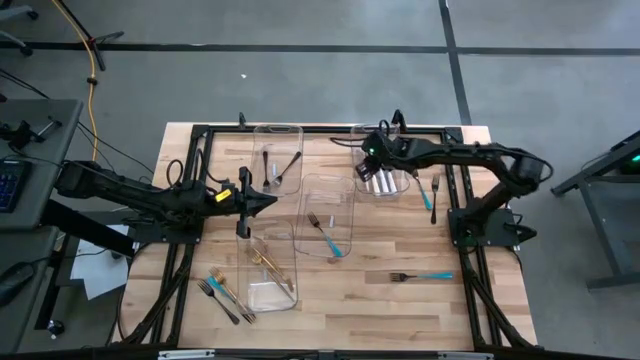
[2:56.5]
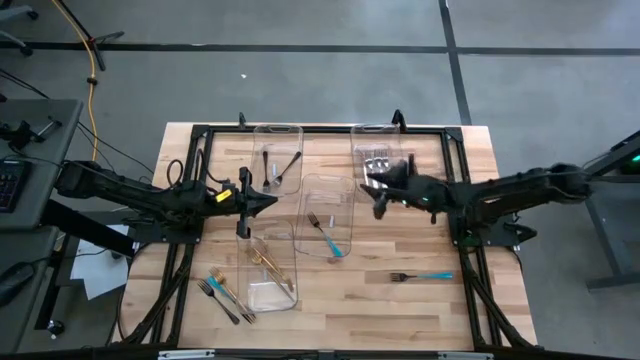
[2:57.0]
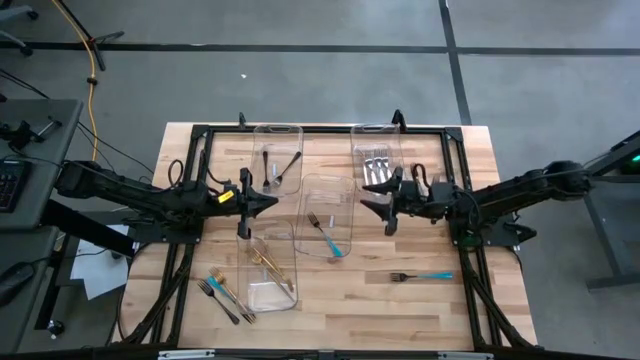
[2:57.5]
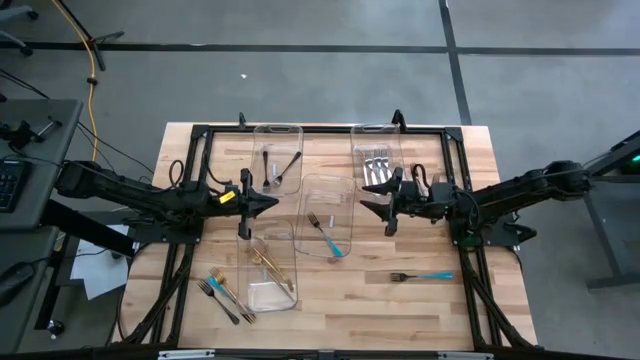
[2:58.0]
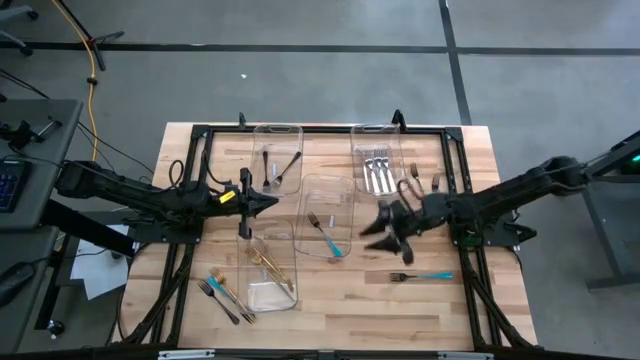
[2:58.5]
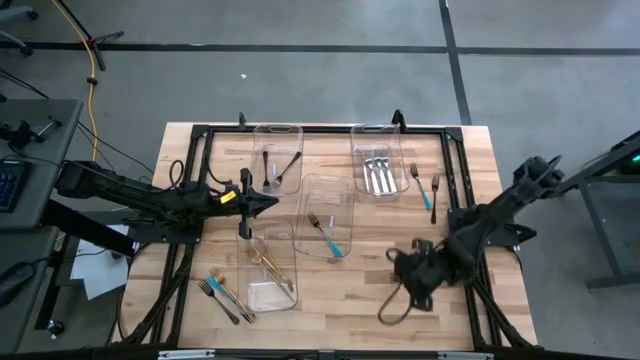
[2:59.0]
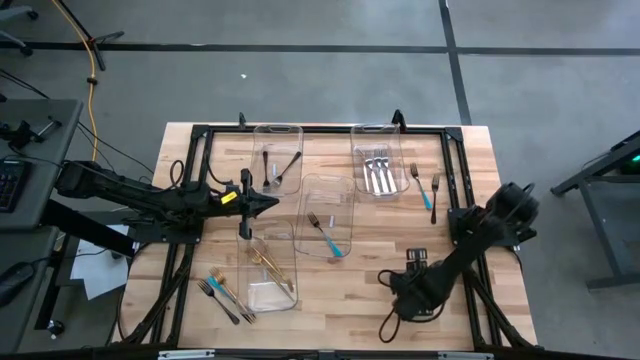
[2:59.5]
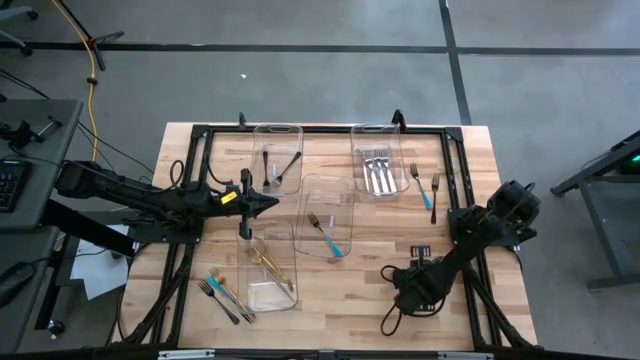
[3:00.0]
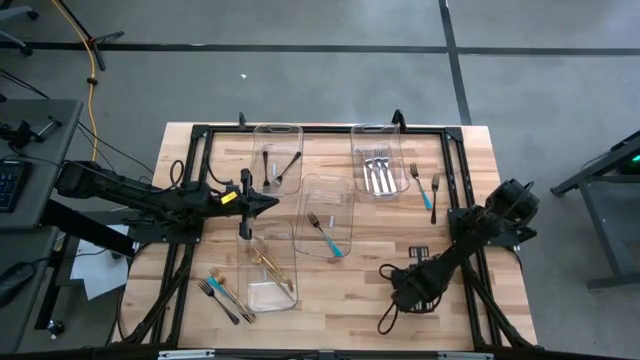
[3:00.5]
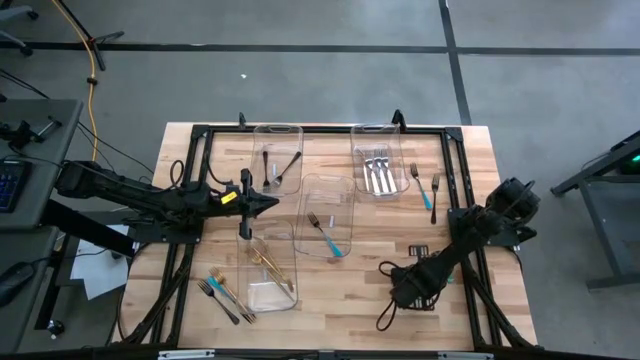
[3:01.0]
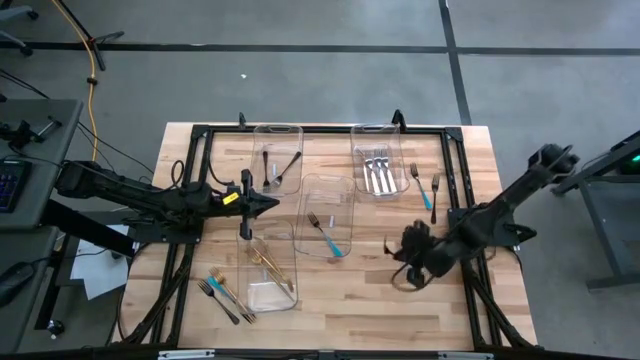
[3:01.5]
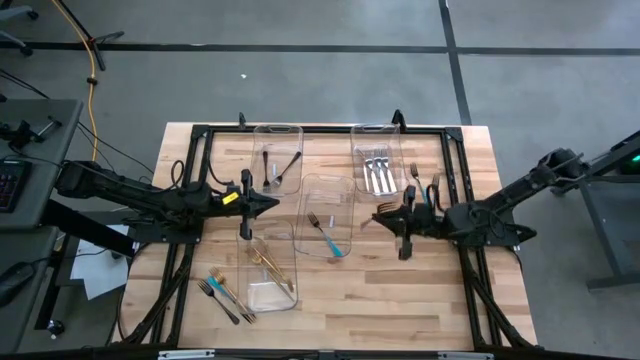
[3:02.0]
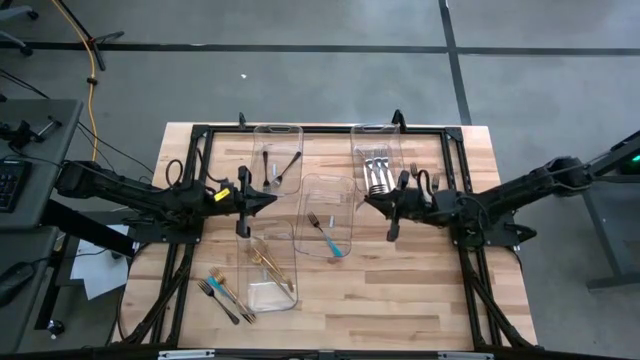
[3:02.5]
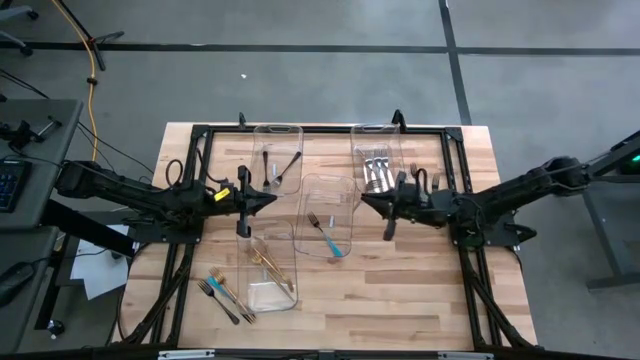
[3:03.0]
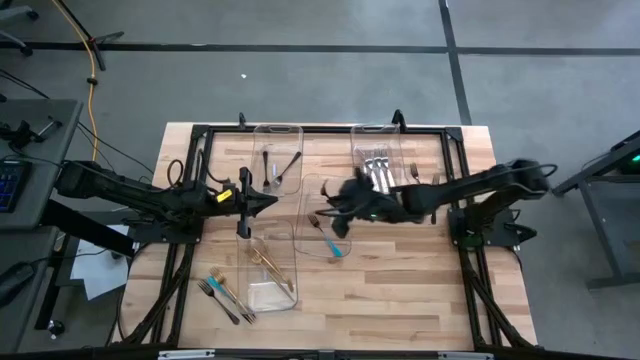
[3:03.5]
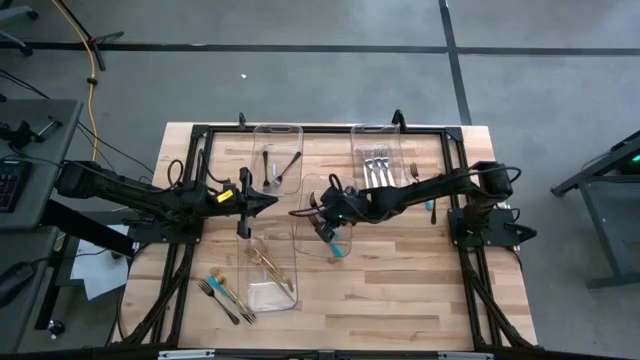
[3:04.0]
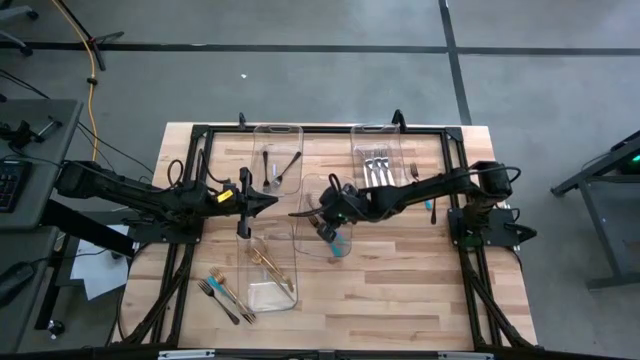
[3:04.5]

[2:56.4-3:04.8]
Task: Sort silverware by color (type)
Put the blue fork into the center transparent bin

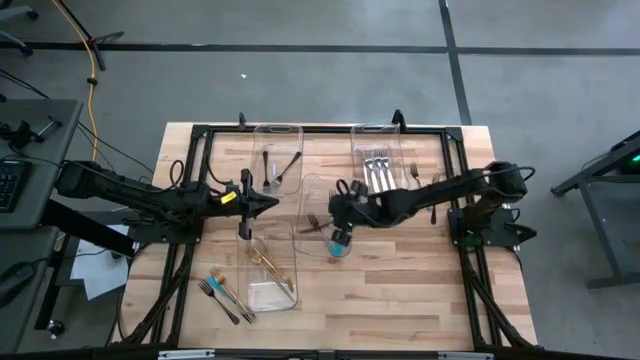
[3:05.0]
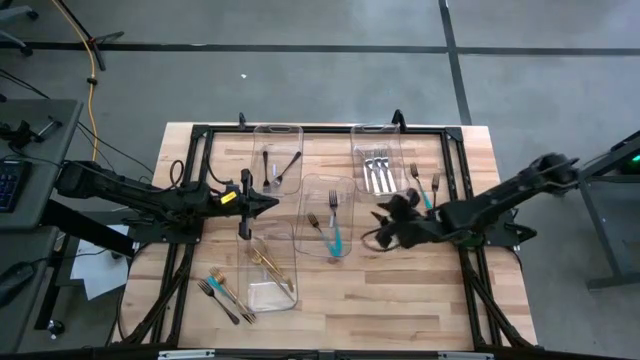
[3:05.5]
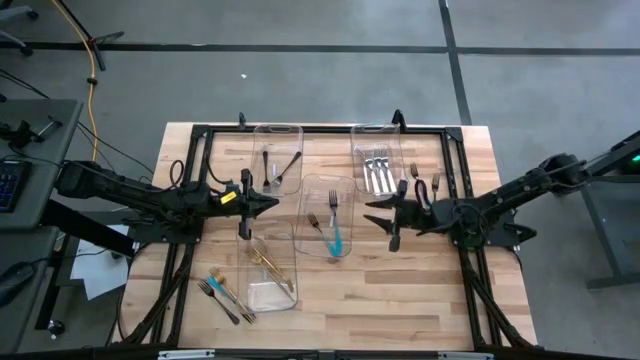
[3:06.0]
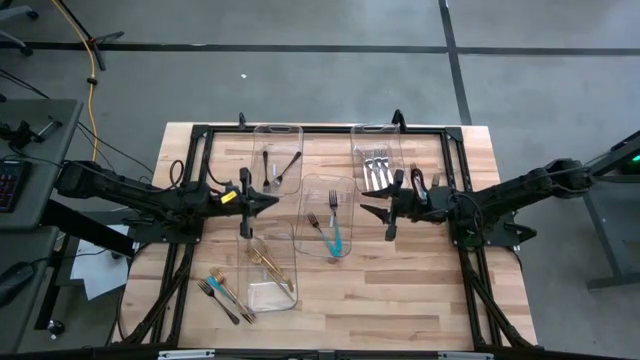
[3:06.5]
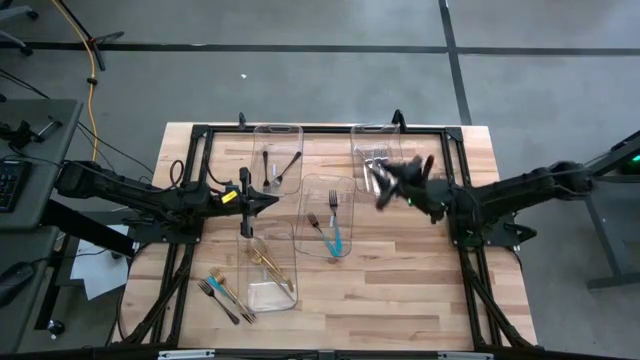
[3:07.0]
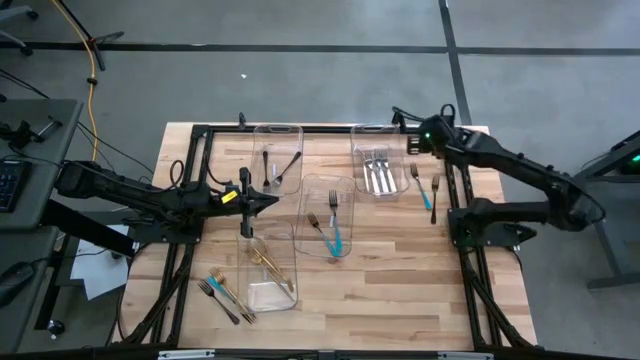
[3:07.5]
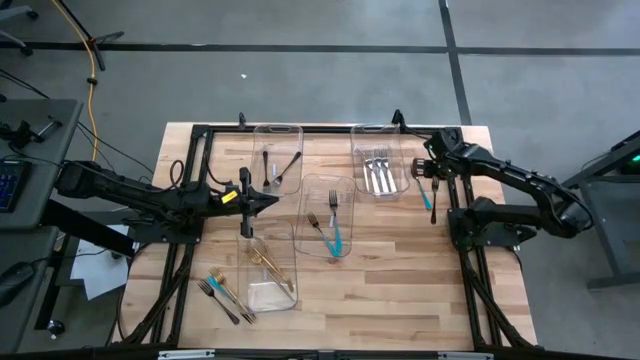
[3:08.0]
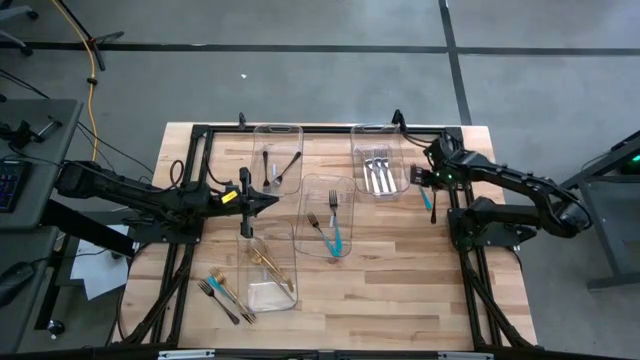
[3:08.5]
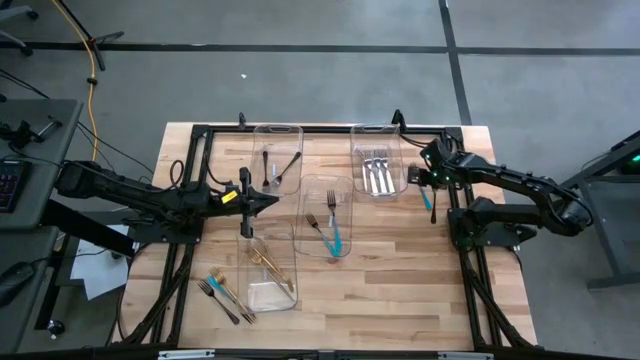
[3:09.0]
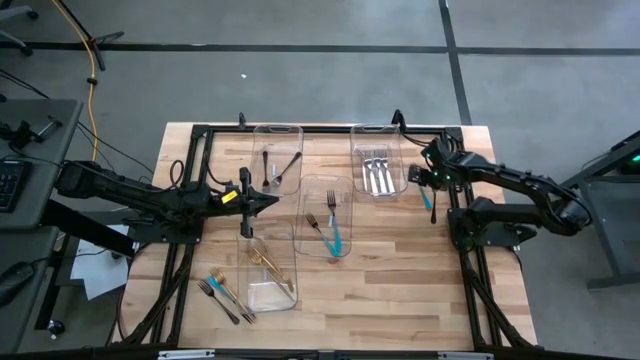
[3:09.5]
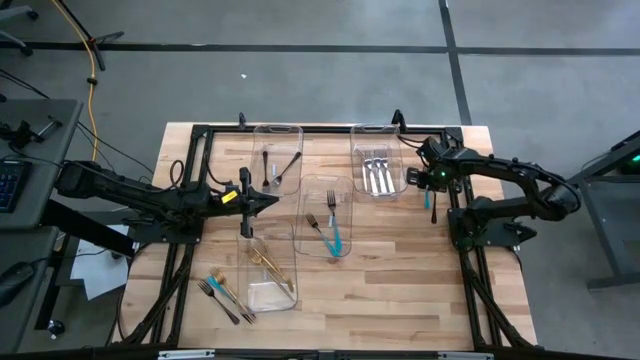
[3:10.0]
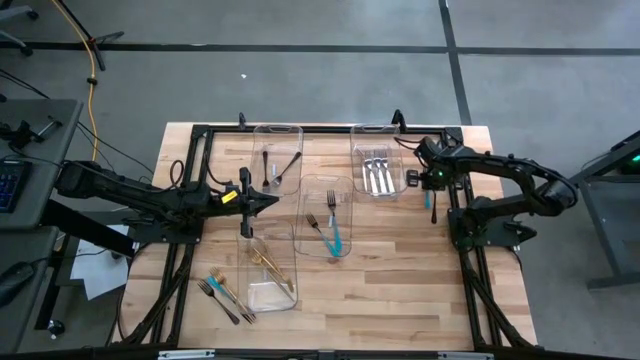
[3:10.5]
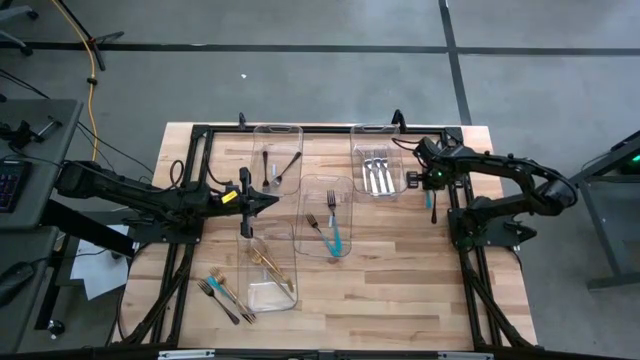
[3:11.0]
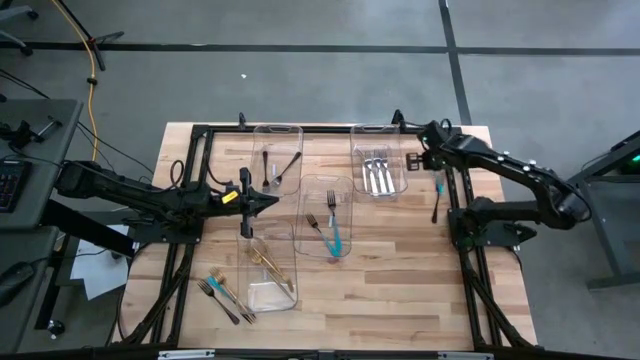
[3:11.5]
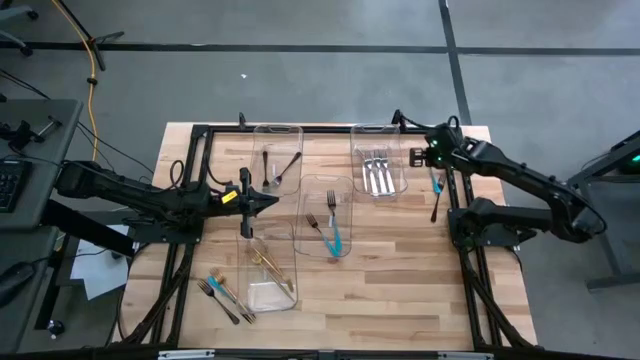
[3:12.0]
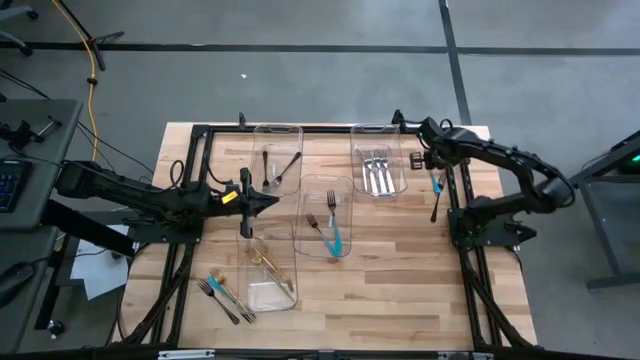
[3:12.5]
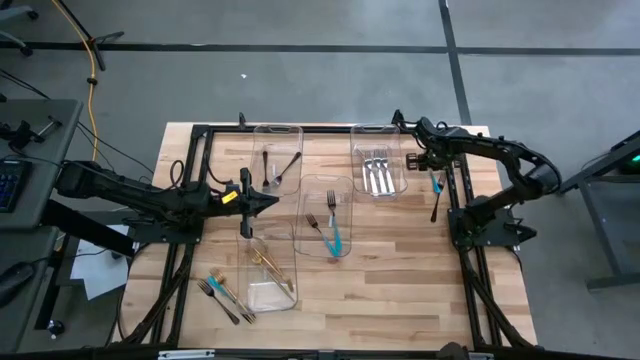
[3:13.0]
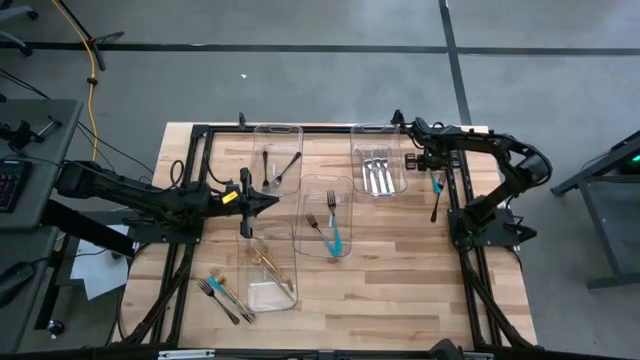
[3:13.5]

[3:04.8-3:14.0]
Put the blue fork into the center transparent bin

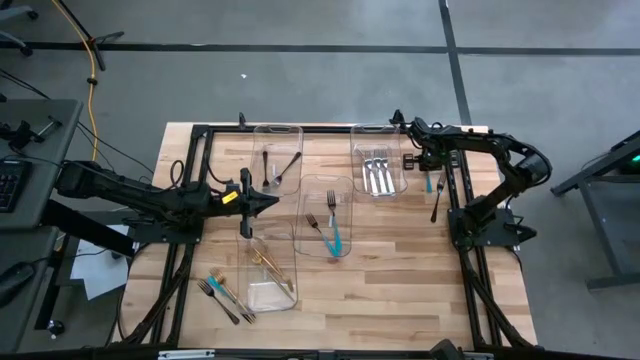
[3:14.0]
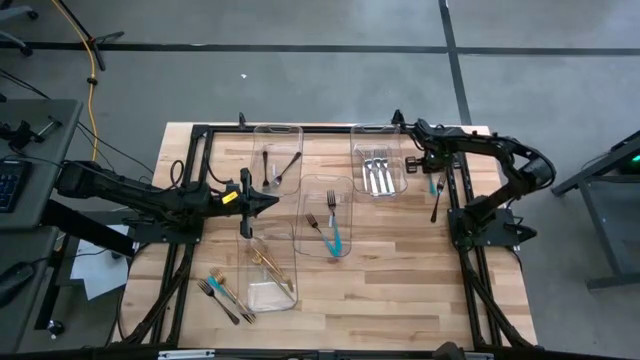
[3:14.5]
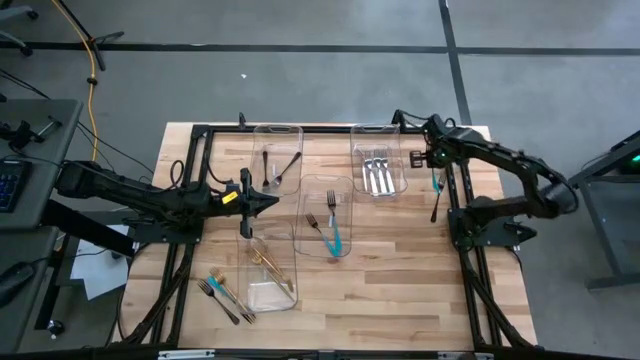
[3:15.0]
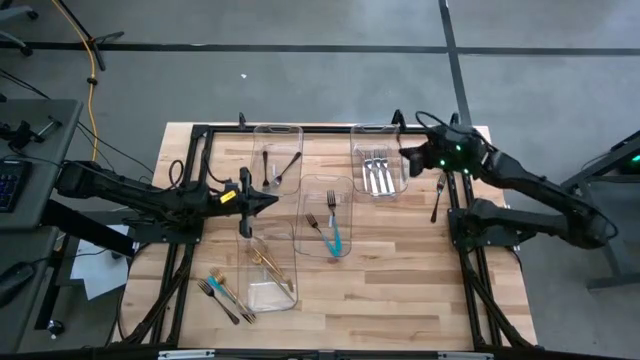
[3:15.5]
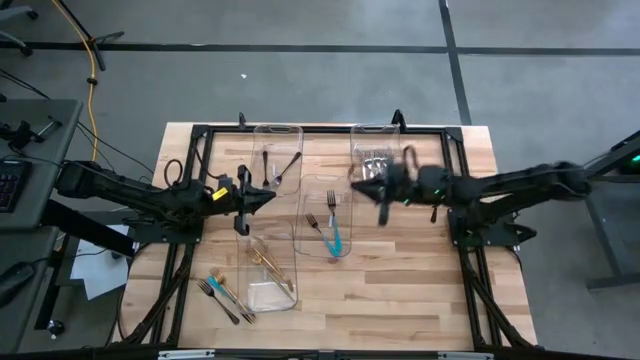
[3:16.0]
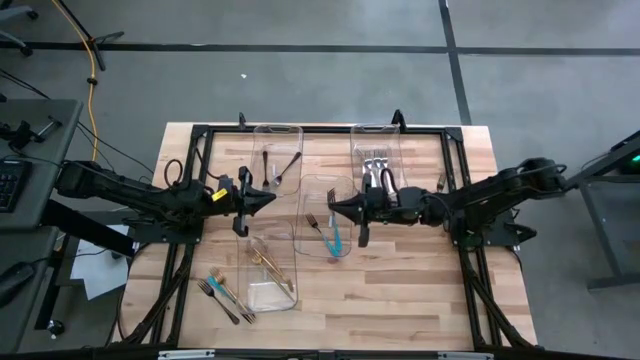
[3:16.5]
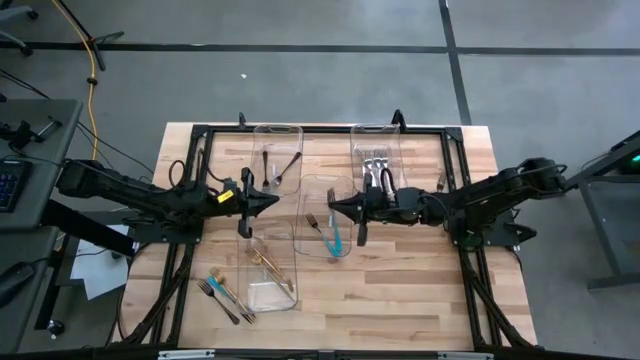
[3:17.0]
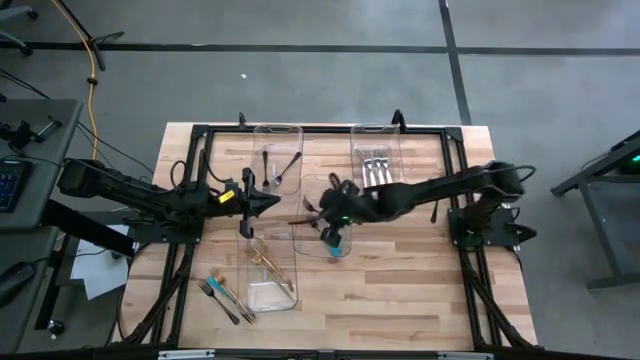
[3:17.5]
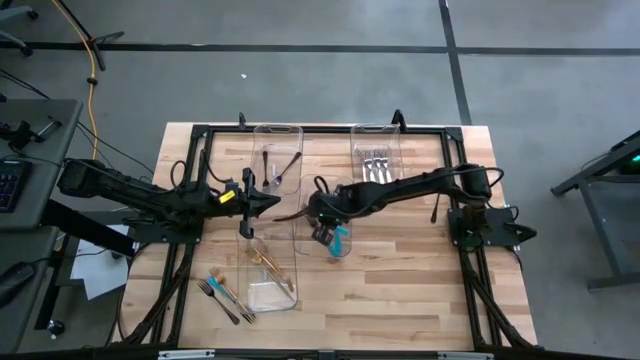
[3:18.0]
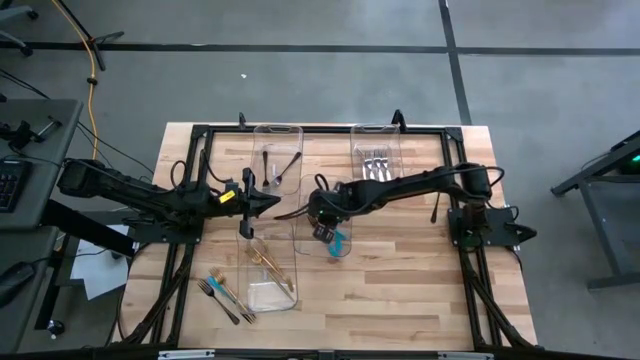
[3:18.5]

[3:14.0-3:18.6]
Put the blue fork into the center transparent bin
